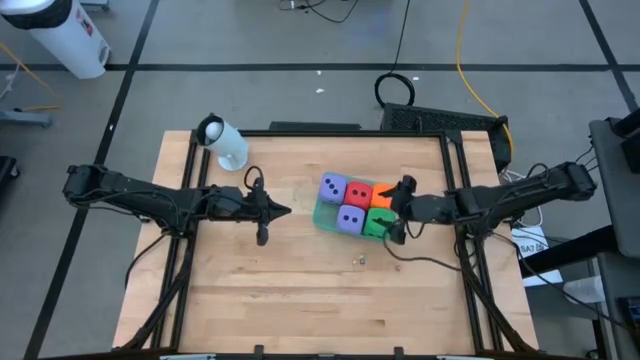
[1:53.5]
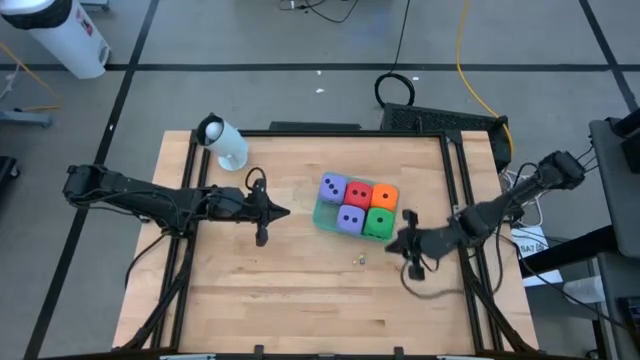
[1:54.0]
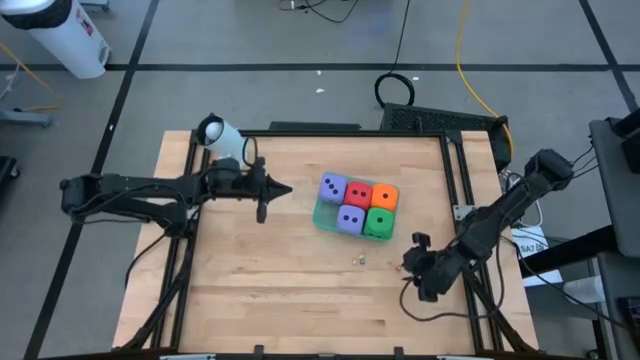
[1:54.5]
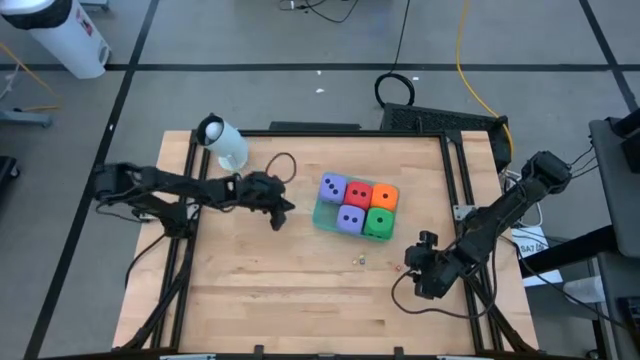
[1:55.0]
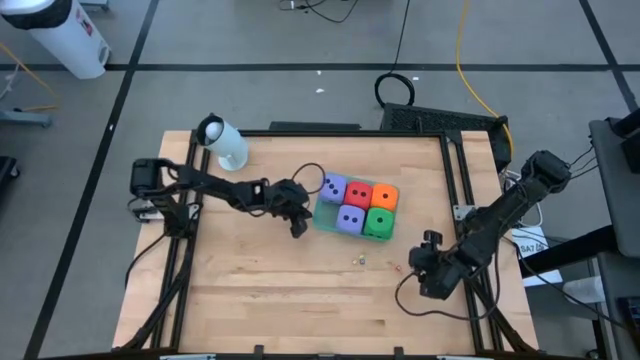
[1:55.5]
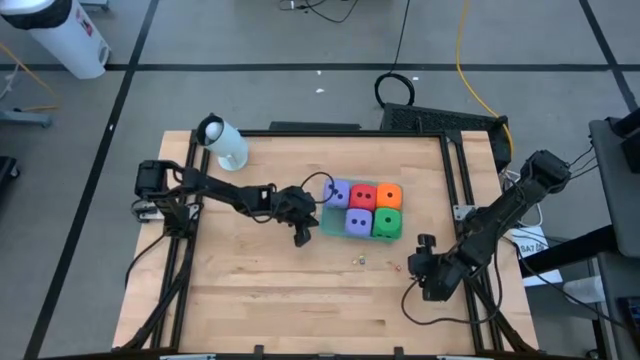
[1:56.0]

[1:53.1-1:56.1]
Task: Pick & Place Dice
Adjust the green bin on the table

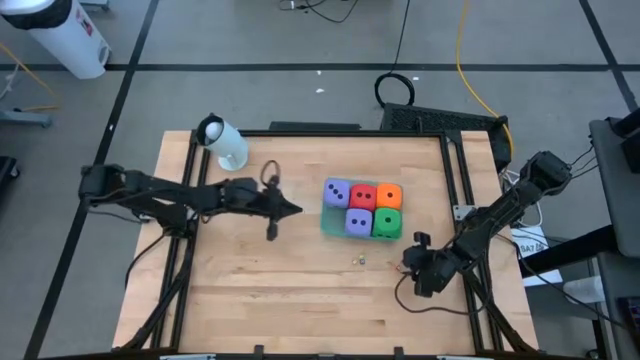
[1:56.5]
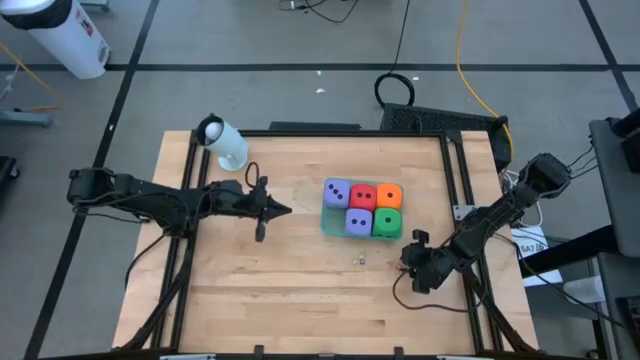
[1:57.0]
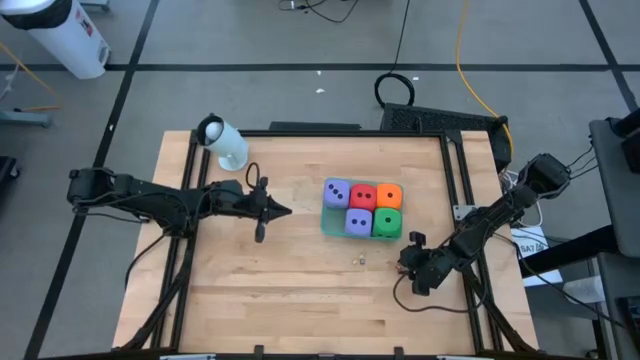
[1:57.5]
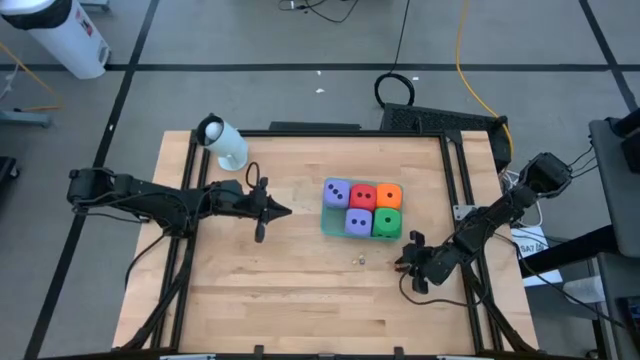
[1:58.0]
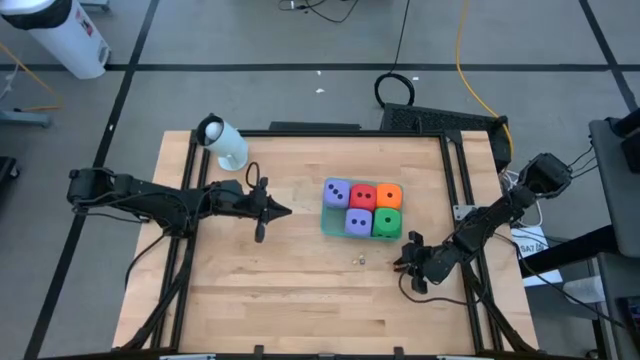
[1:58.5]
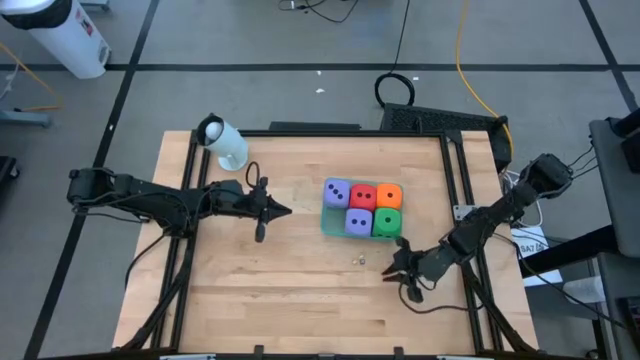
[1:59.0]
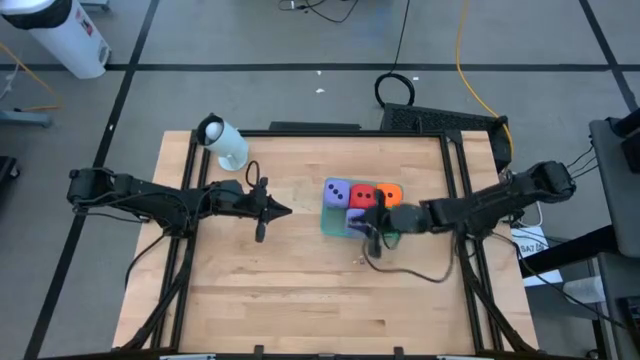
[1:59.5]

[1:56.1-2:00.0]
Put the small red die into the green bin

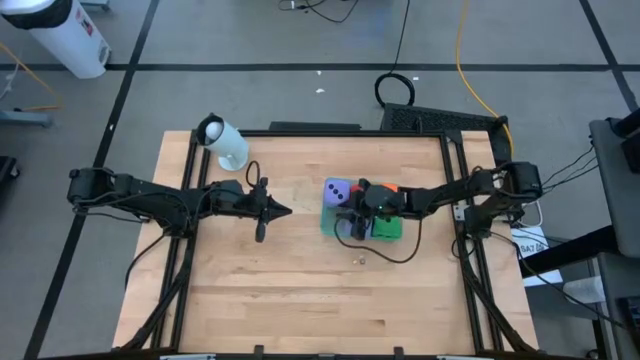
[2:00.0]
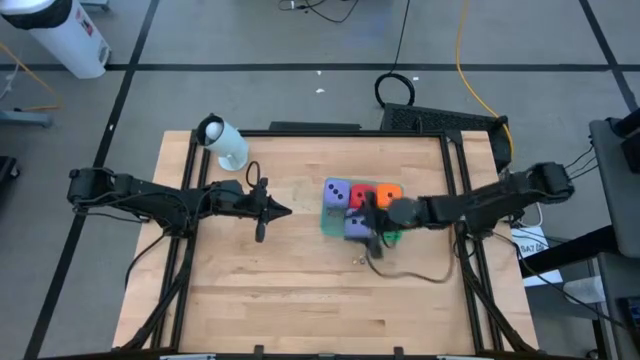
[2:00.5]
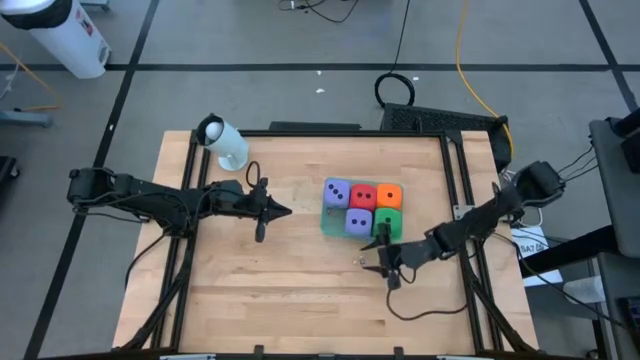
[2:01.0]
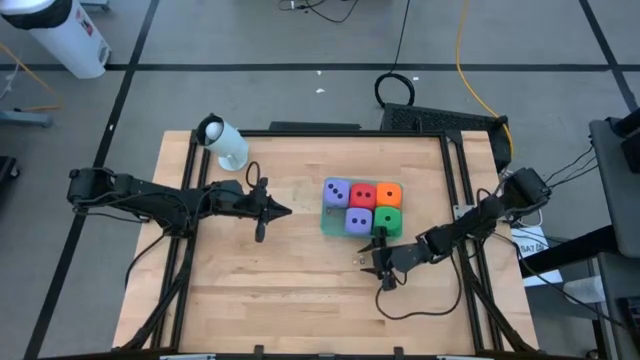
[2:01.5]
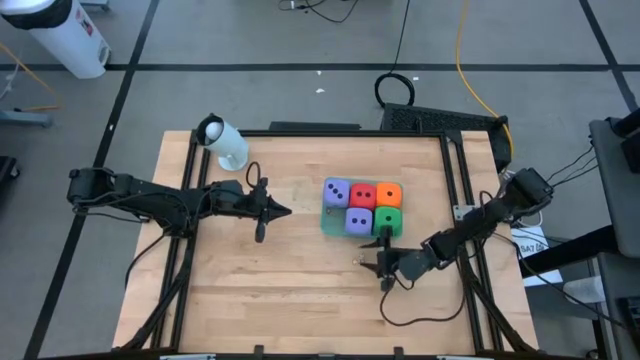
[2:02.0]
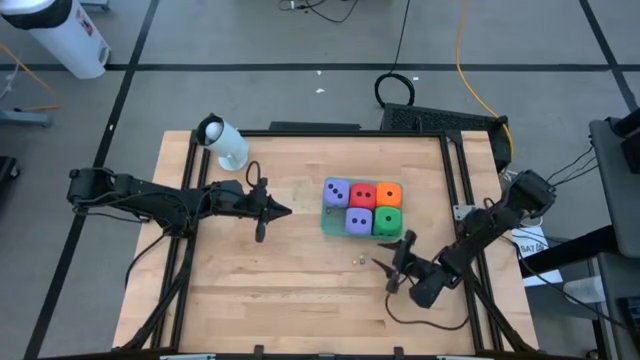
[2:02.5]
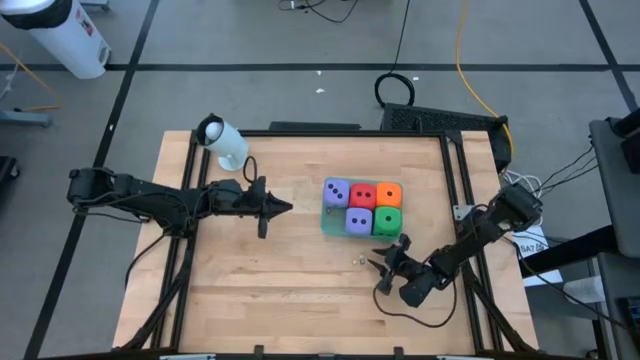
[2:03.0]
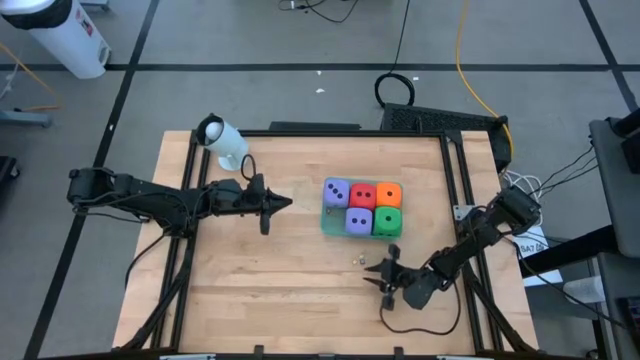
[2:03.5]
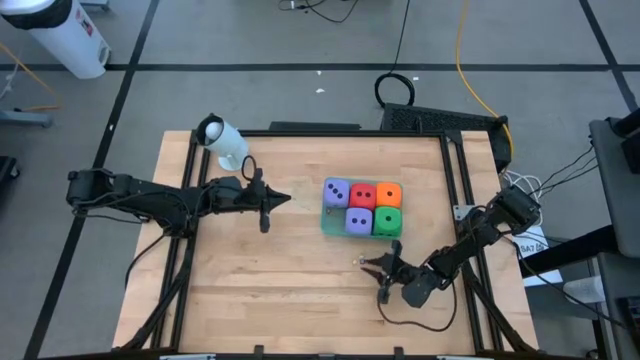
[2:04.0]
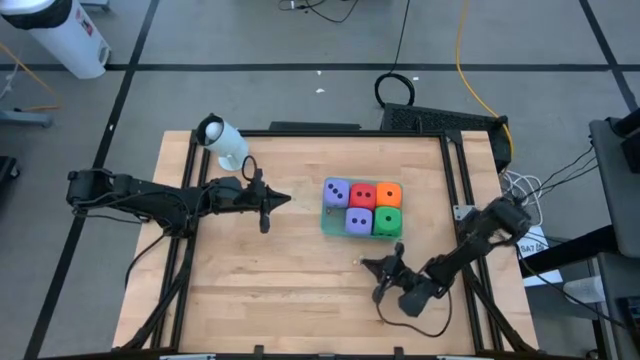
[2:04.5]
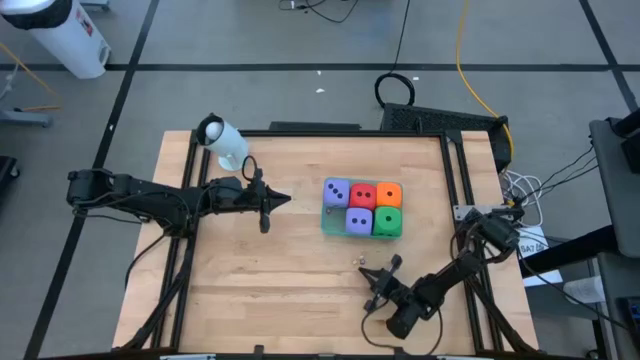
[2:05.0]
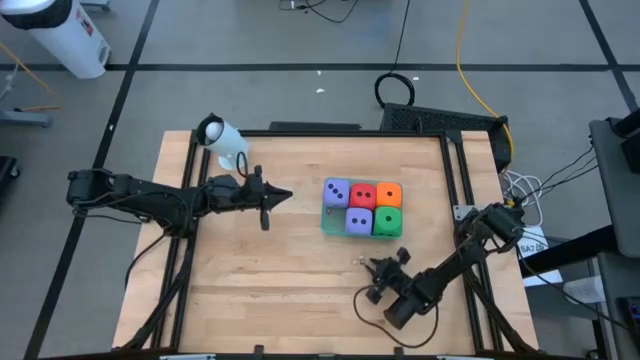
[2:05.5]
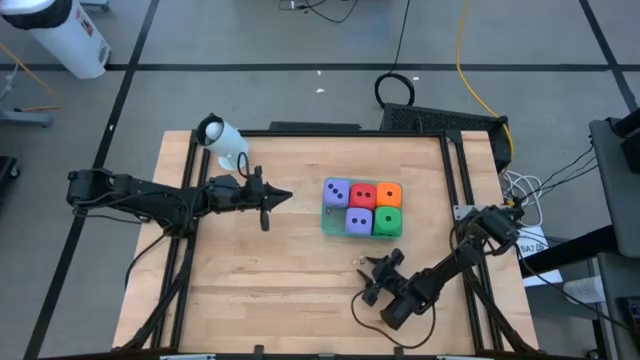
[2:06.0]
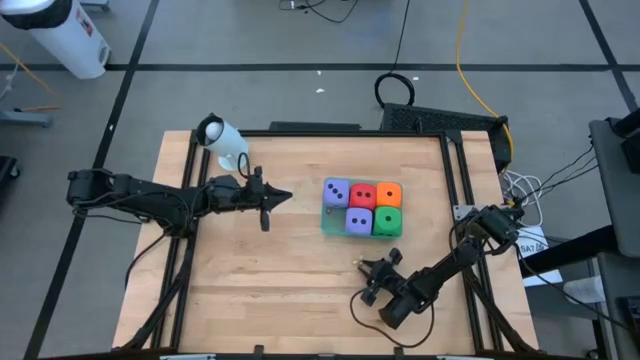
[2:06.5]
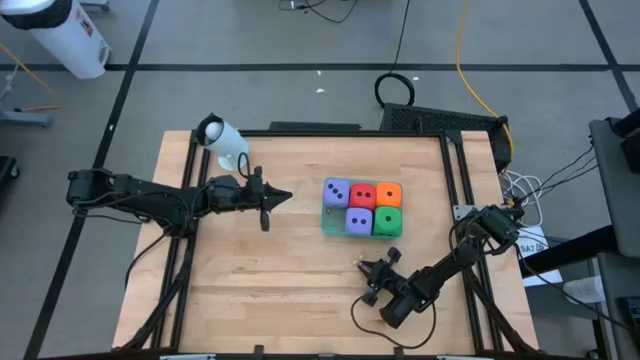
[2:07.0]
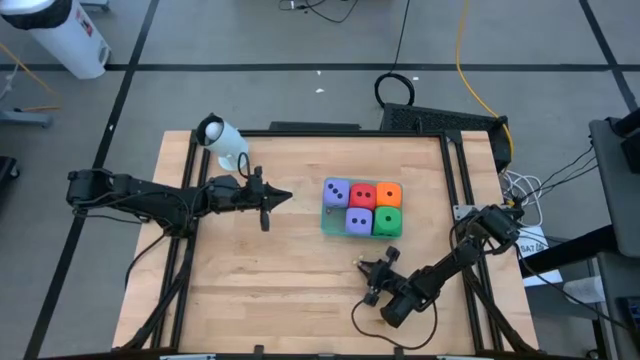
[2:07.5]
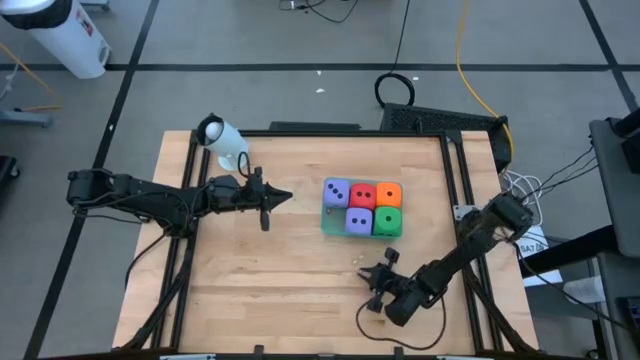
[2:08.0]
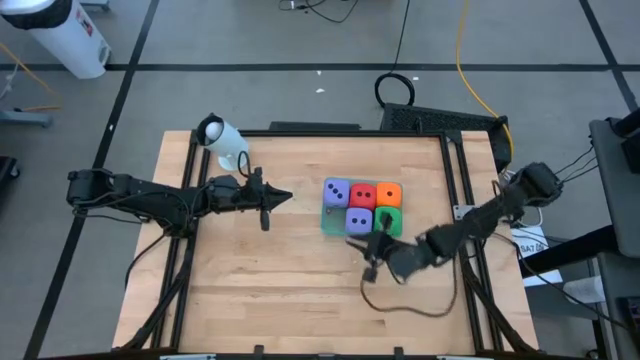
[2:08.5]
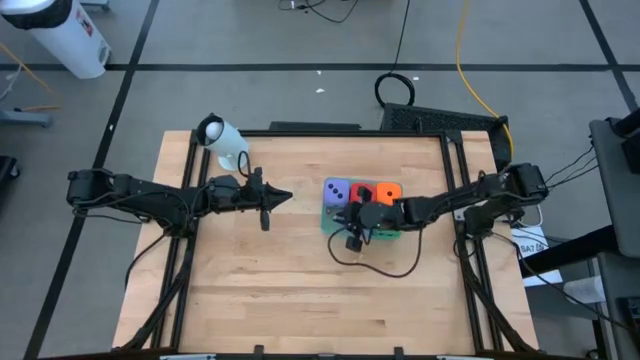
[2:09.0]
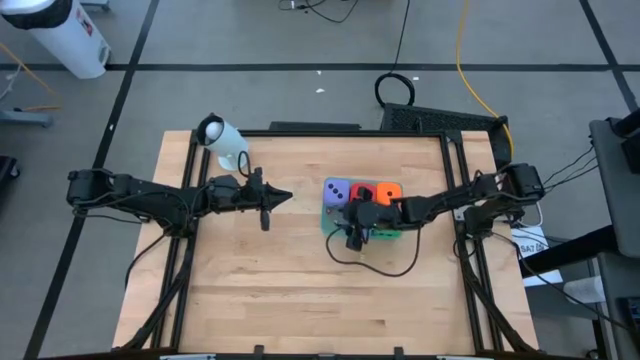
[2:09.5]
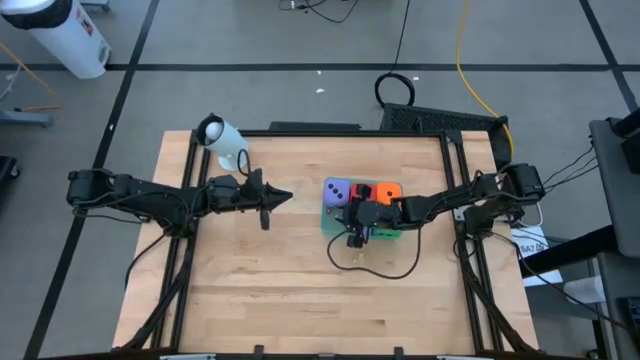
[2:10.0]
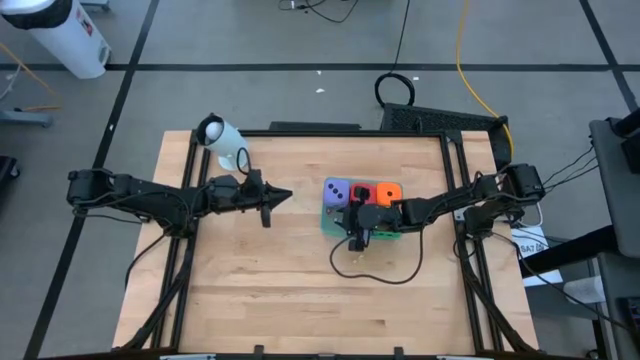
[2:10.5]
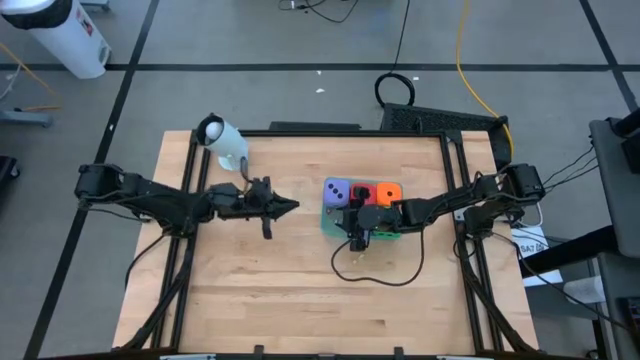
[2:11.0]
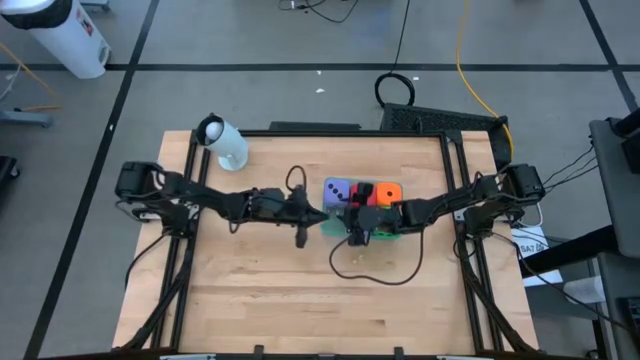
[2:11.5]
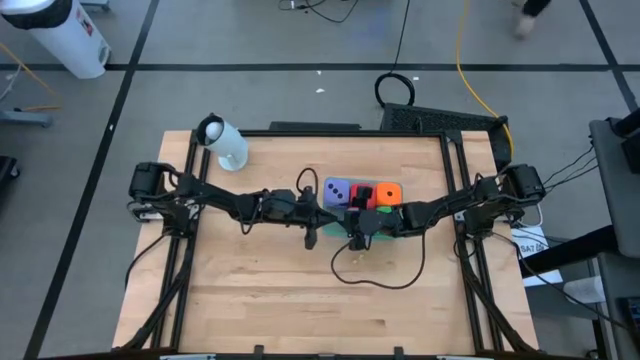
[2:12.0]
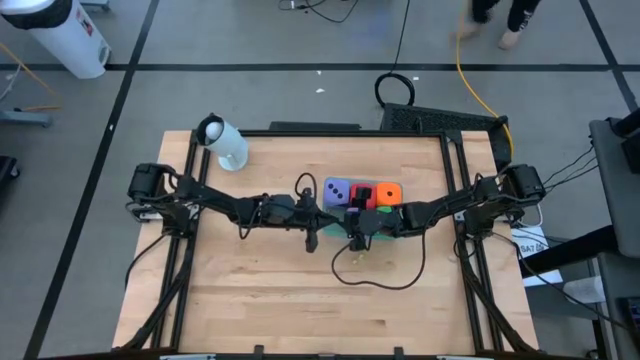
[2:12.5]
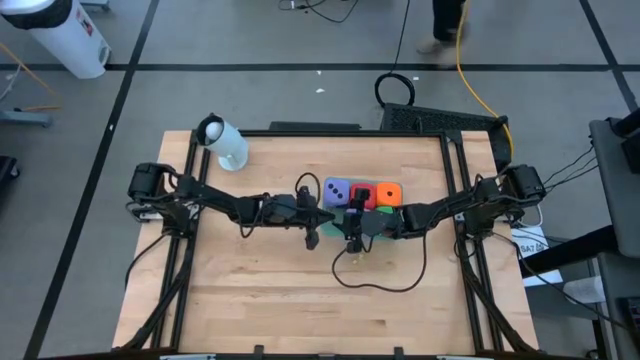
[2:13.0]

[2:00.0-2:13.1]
Put the small purple die into the green bin

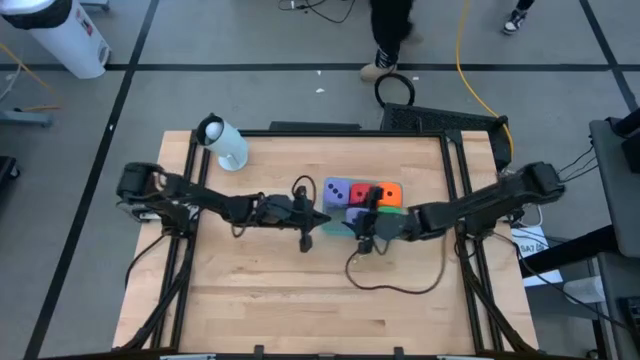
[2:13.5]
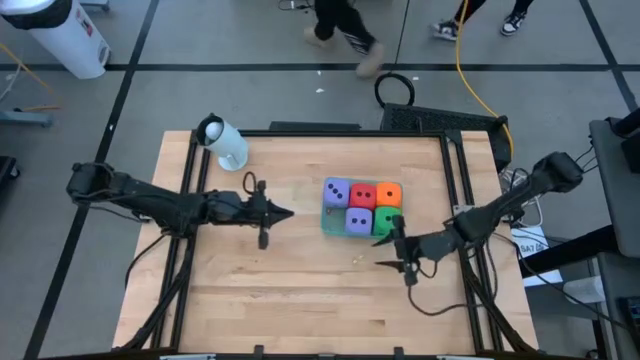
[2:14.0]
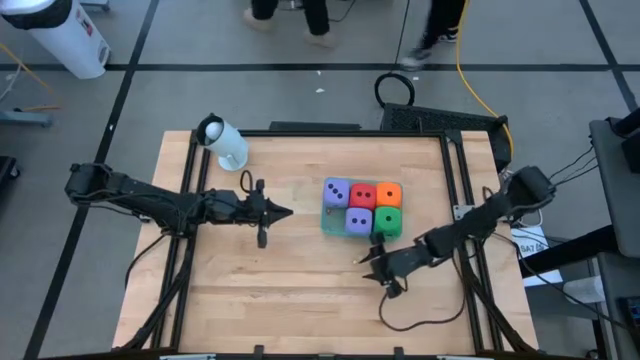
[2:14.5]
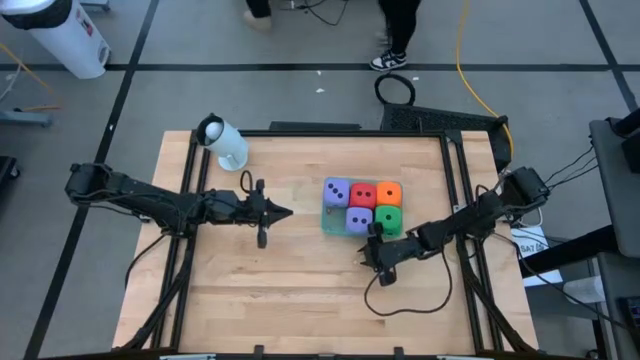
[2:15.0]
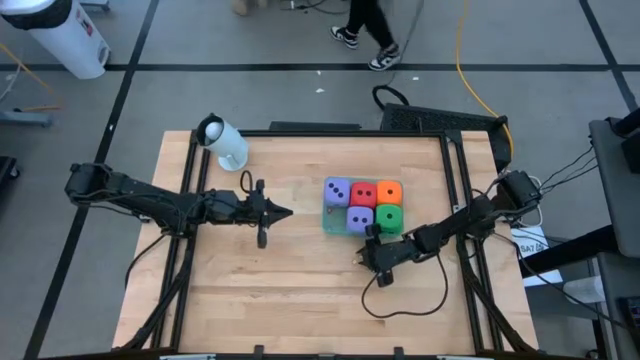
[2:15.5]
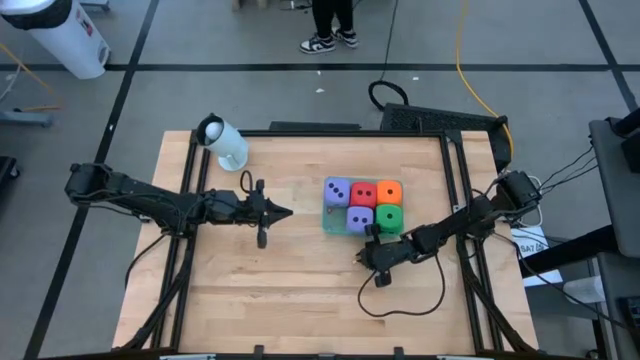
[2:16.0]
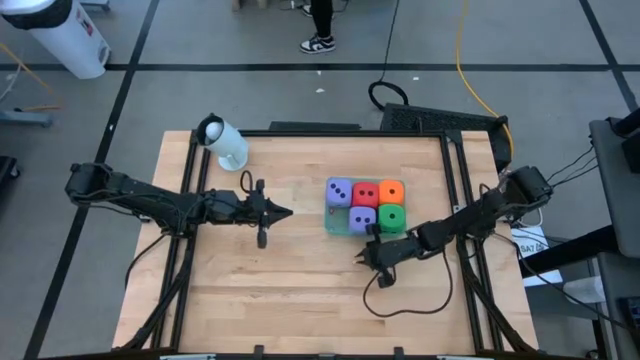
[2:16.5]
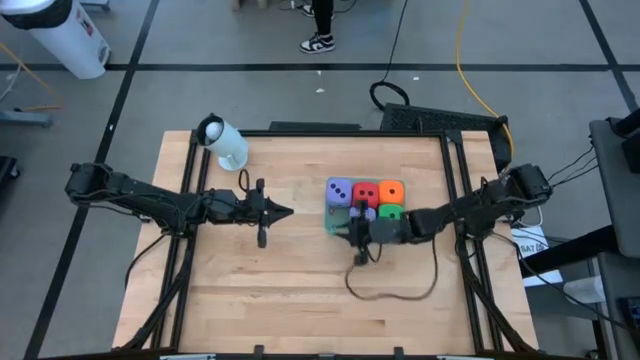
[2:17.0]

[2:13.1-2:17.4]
Put the small green die into the green bin
